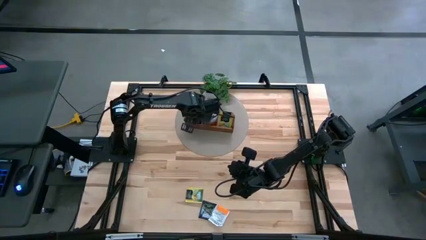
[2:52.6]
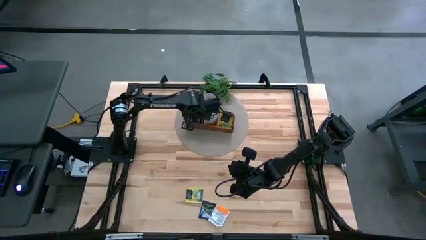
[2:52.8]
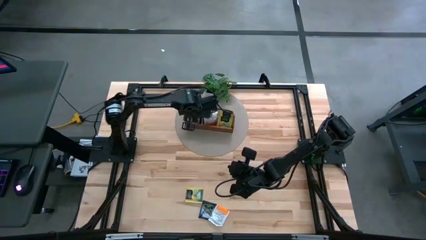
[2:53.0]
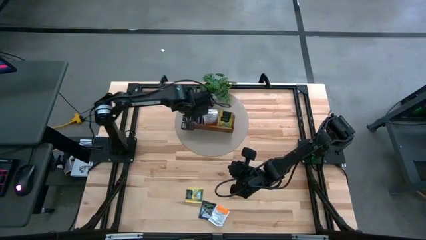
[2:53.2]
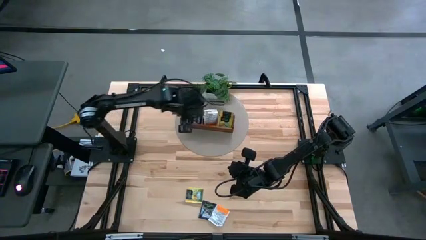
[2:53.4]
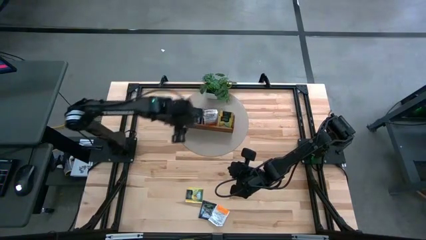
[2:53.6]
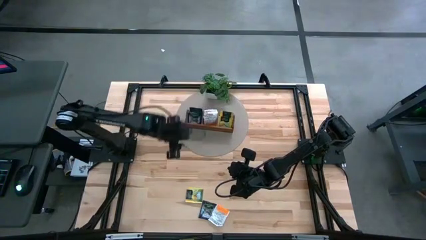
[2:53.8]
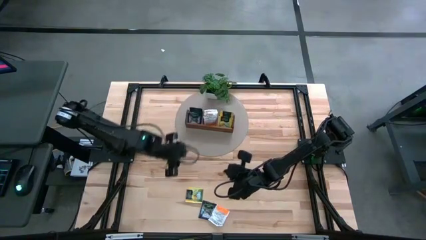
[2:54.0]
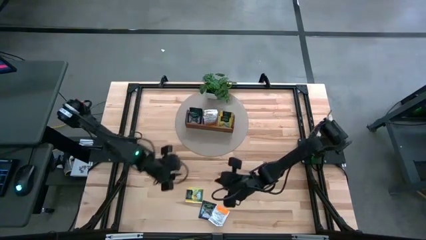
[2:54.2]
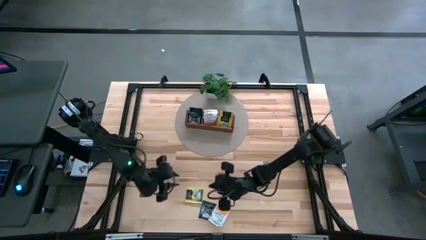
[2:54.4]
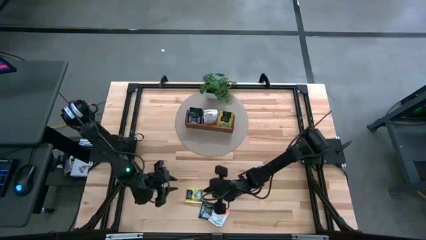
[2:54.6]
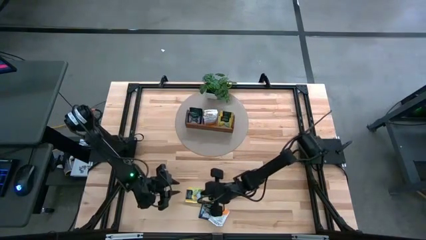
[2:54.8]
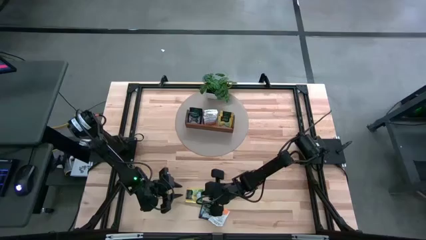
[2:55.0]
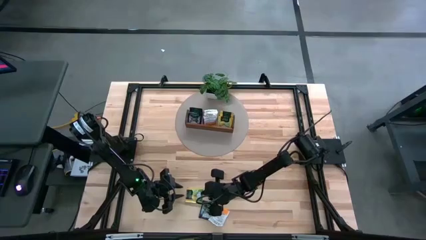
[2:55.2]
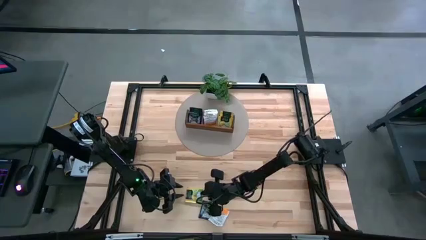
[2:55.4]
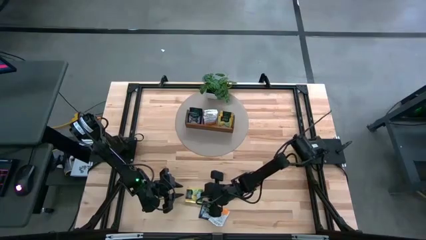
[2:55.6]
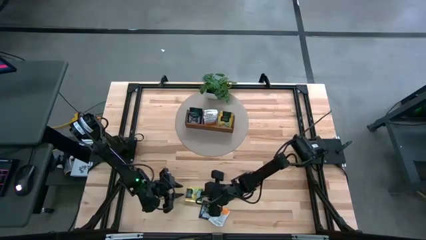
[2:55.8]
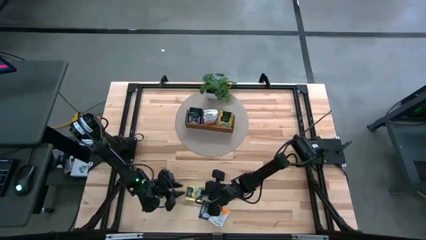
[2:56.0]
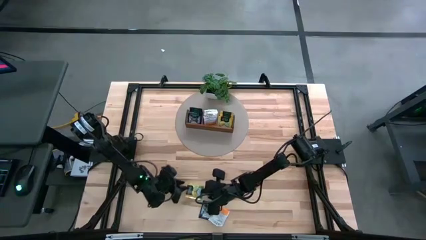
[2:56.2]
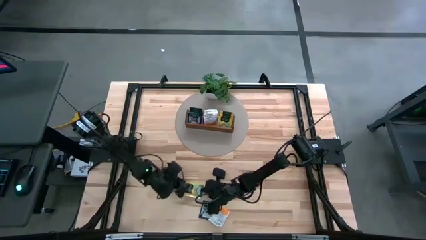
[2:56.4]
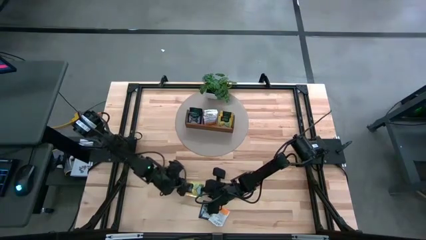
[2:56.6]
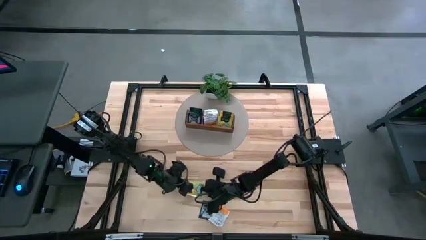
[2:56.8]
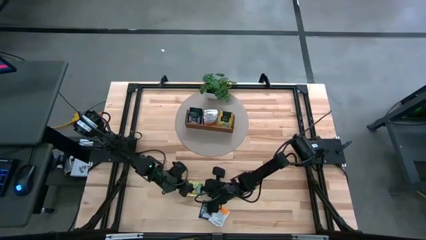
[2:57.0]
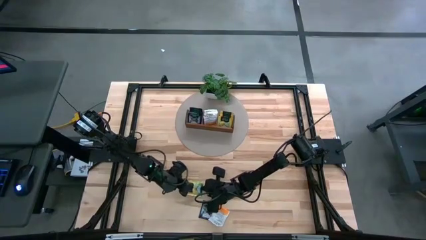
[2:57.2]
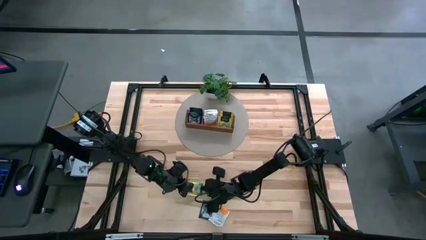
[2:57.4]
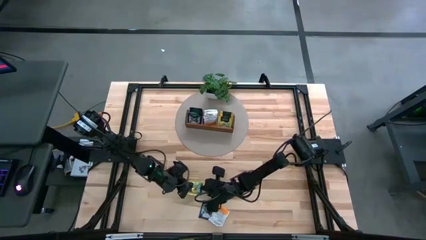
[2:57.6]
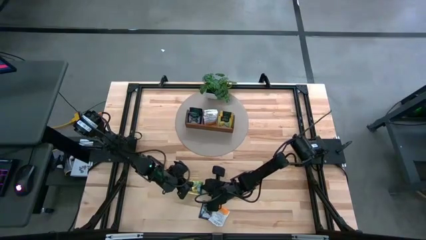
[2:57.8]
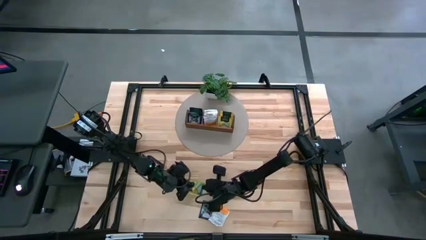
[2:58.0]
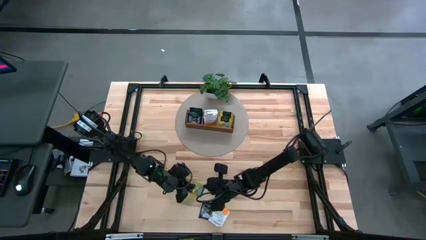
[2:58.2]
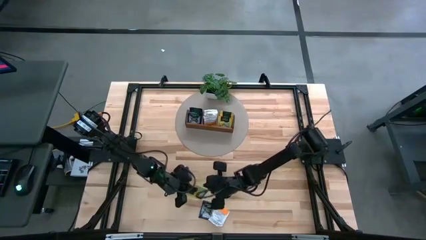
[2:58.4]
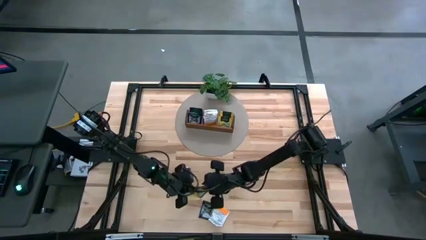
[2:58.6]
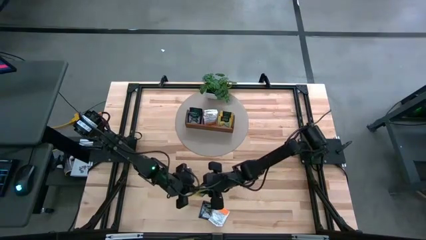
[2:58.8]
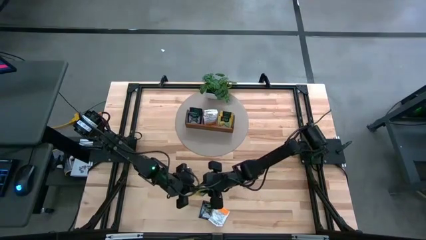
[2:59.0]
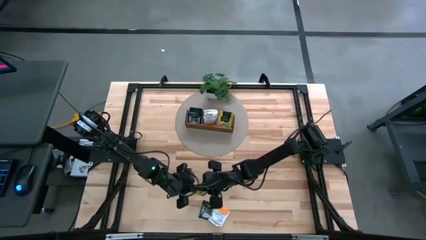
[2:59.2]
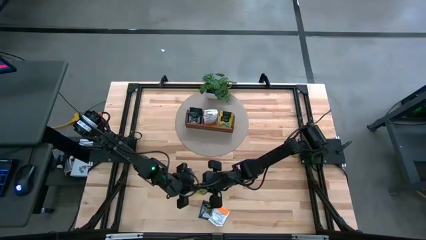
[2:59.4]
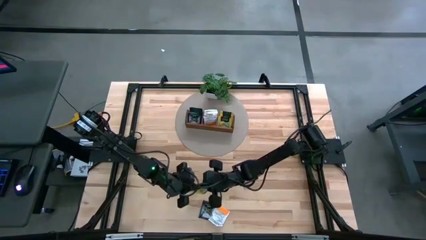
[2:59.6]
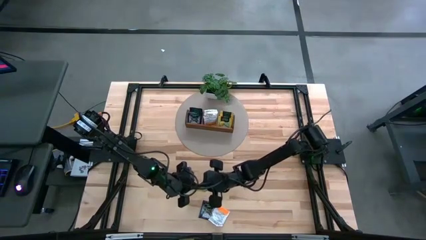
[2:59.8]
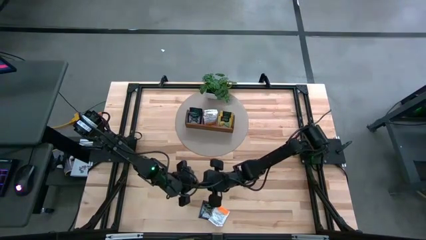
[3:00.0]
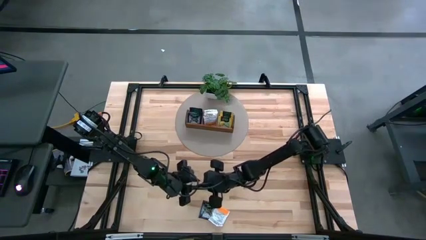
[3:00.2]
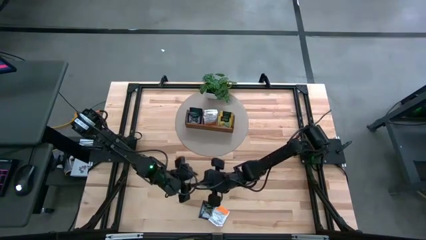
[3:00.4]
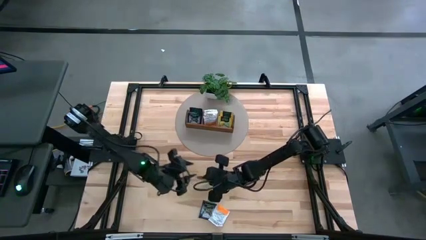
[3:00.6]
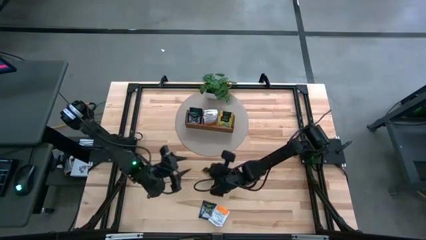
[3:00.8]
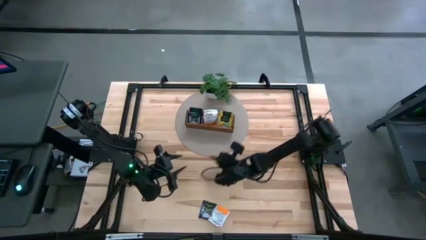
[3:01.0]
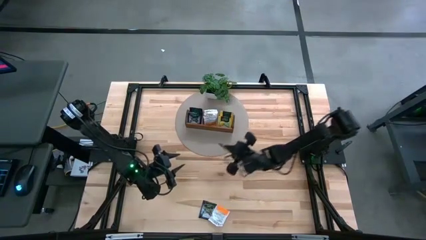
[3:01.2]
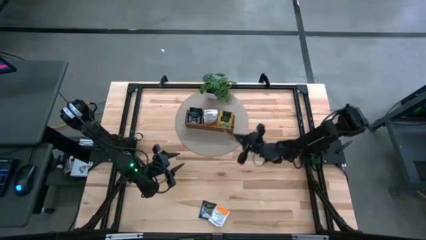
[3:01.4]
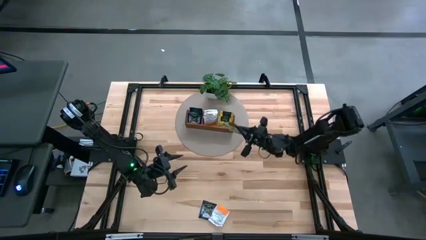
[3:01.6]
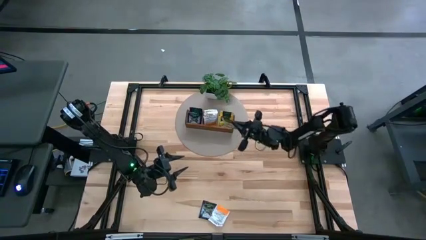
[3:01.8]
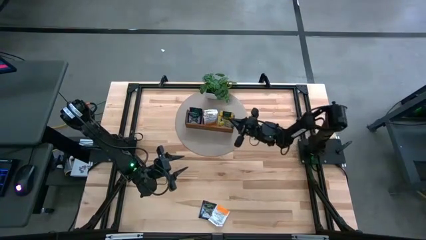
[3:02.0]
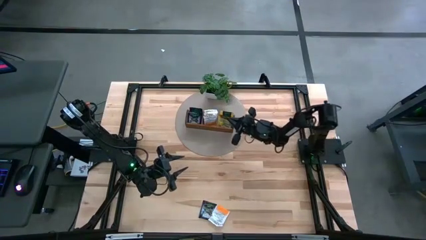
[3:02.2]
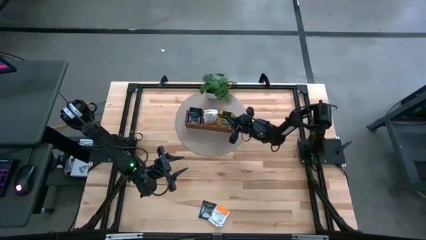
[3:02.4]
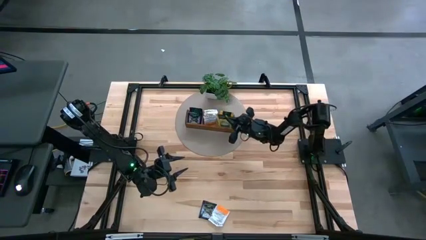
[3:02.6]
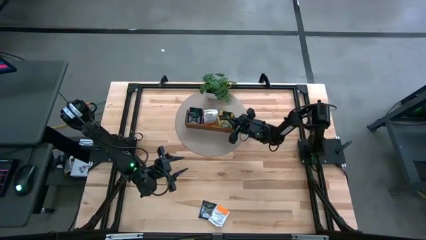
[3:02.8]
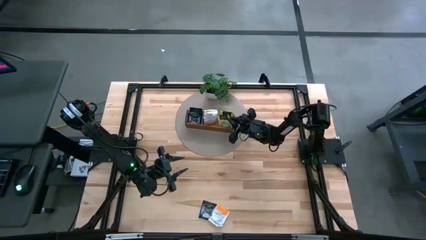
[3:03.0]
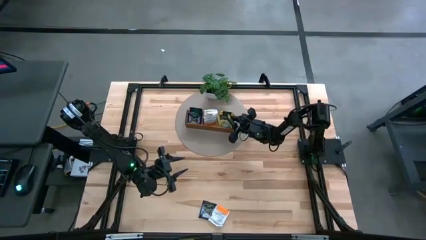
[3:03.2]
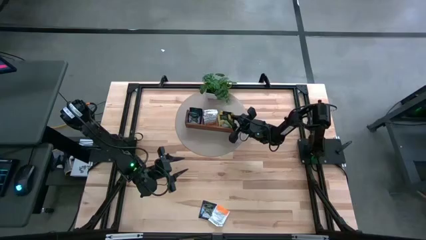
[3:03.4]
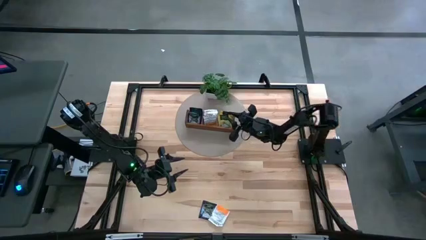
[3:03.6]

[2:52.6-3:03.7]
Task: Pick & Place Tea
Put the yellow tea bag into the right section of the wooden organizer

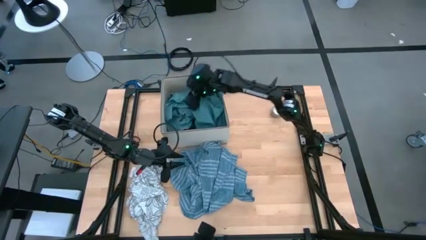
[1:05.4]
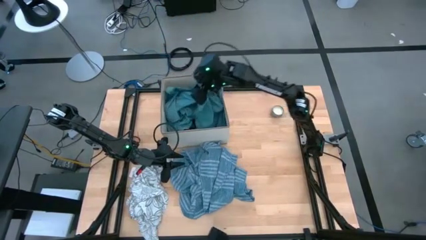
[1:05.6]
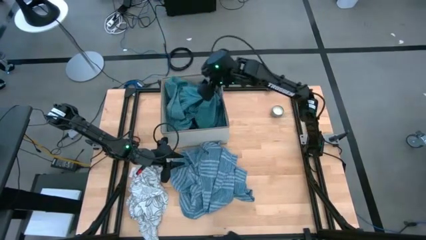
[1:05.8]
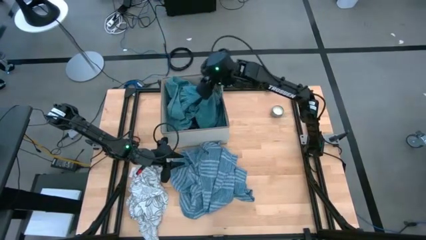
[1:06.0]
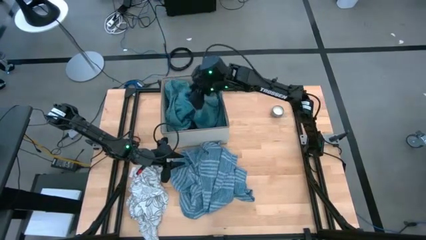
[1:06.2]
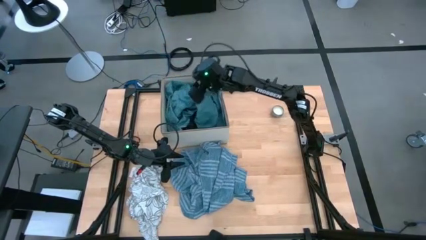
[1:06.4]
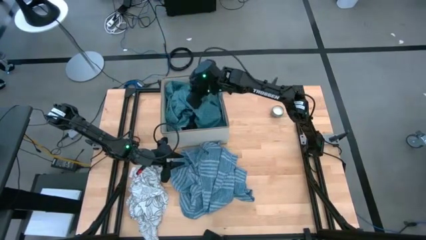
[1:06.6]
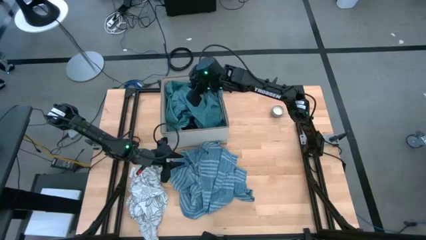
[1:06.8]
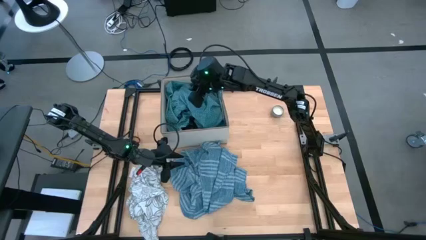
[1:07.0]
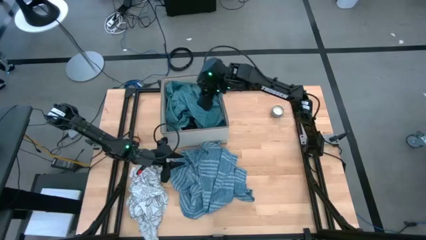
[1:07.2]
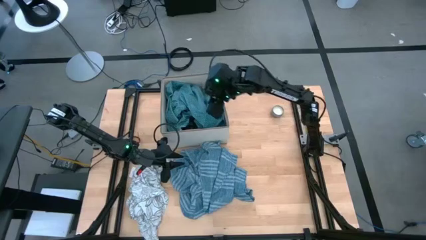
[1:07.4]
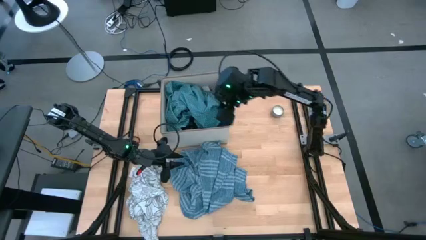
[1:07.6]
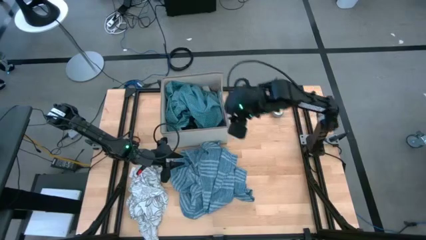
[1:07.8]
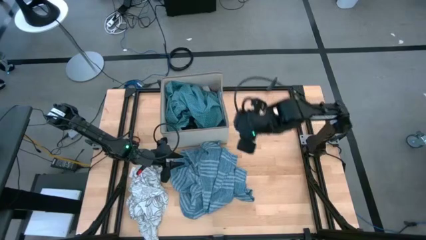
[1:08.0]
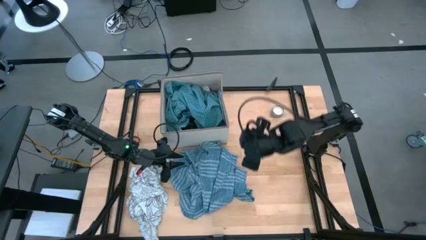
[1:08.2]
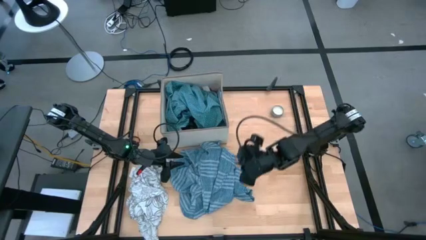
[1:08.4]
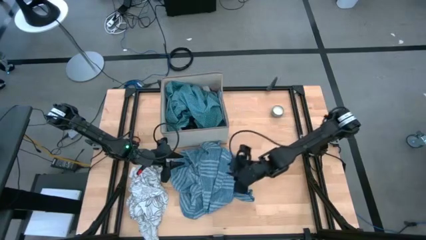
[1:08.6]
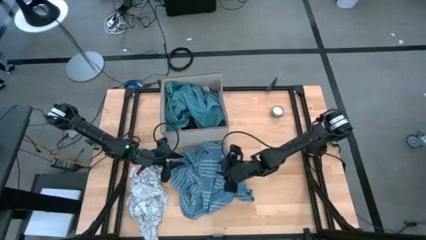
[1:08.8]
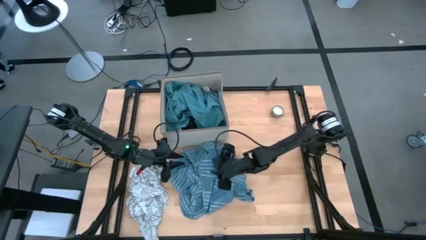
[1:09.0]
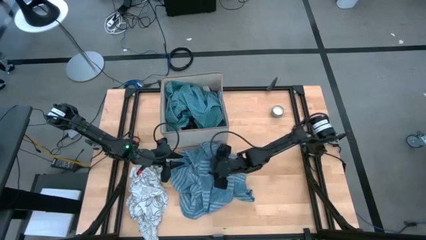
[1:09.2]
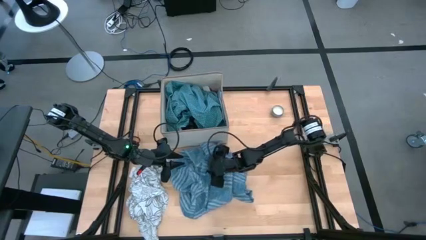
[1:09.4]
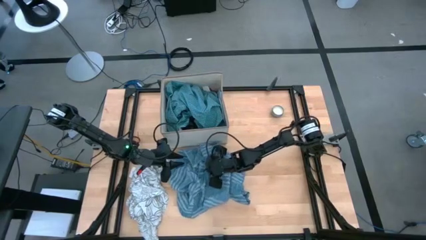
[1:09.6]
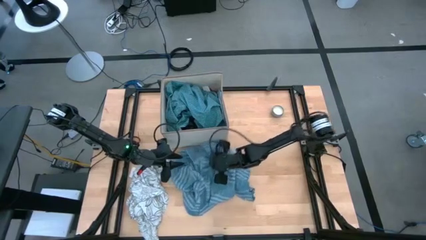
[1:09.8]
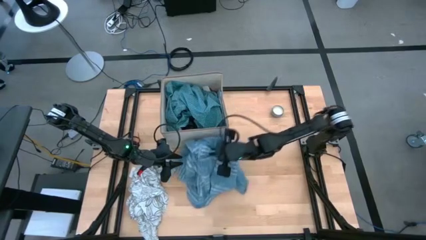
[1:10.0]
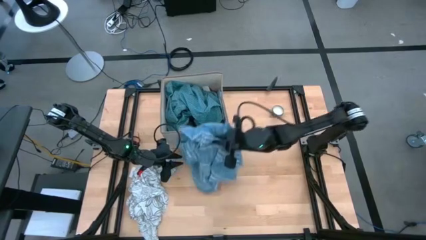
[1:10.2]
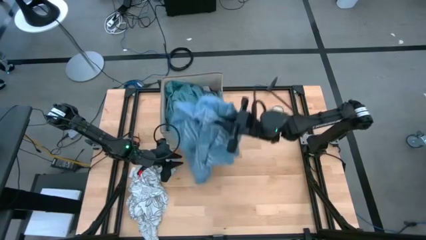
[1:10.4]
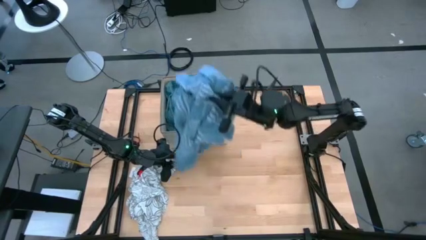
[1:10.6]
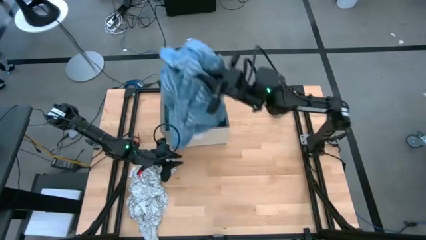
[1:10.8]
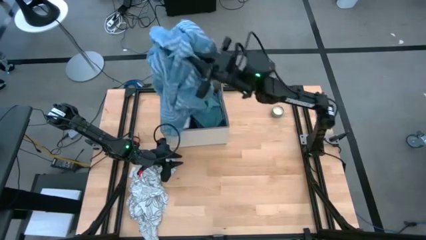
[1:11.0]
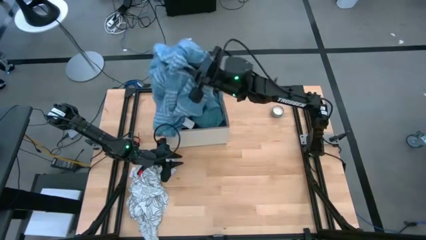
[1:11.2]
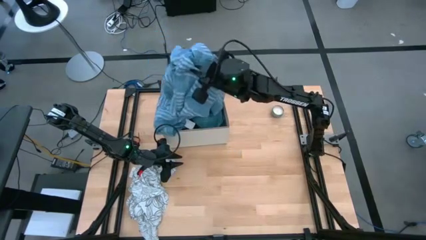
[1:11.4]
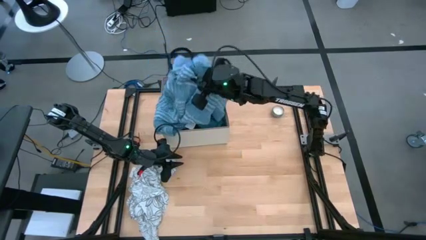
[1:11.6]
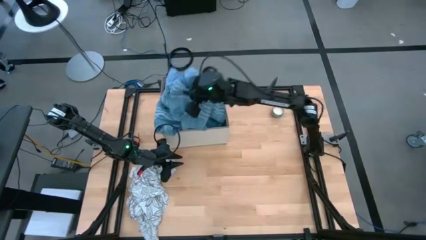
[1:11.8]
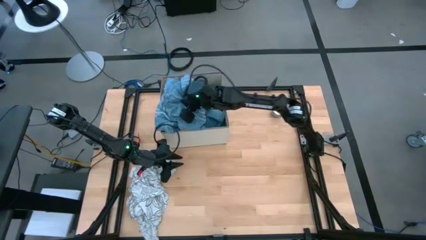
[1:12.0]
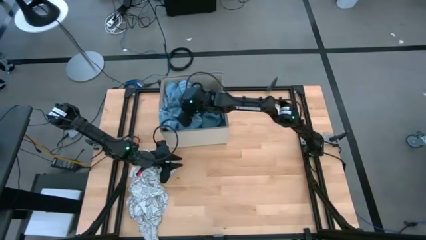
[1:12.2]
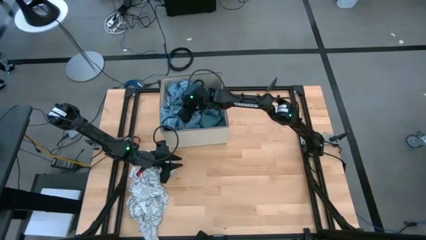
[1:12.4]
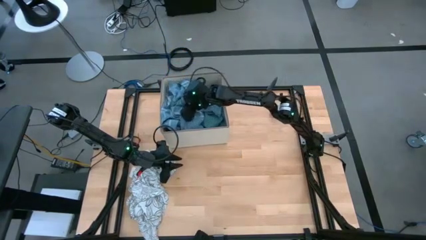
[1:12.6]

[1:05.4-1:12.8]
Task: Sort clothes
Put the blue shorts into the white laundry organizer
